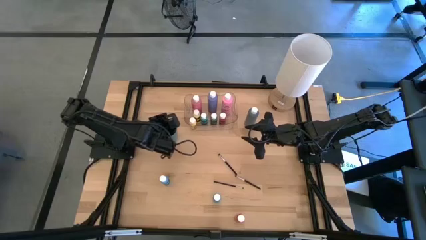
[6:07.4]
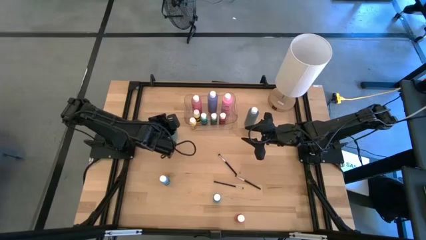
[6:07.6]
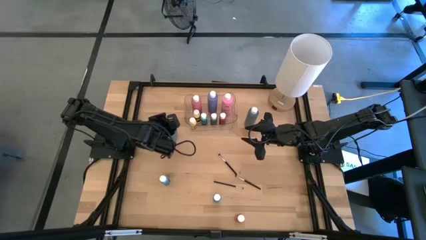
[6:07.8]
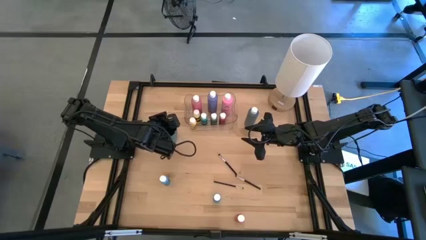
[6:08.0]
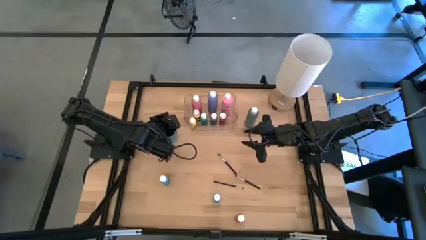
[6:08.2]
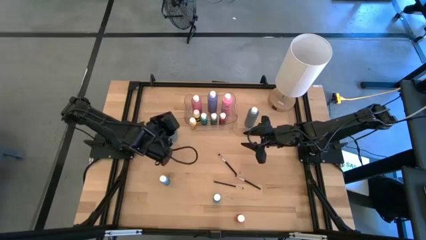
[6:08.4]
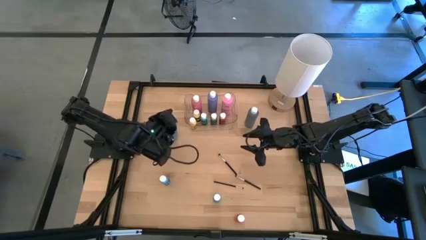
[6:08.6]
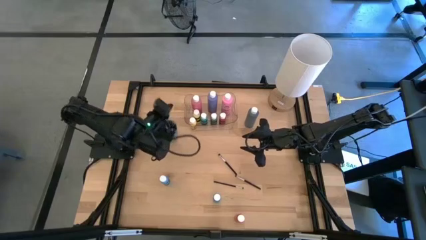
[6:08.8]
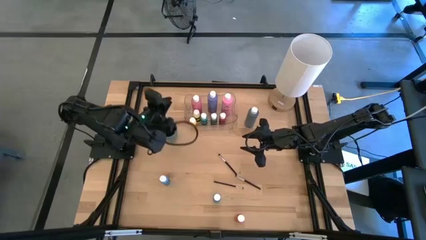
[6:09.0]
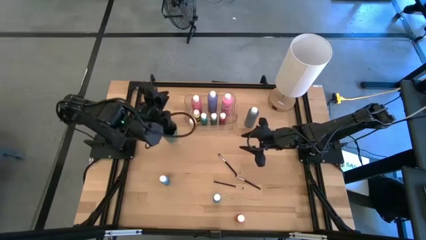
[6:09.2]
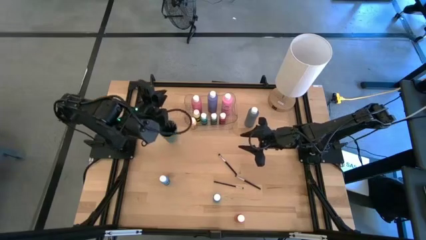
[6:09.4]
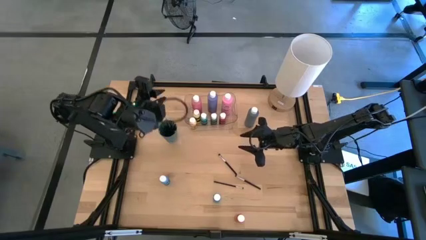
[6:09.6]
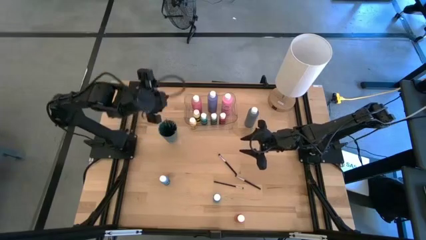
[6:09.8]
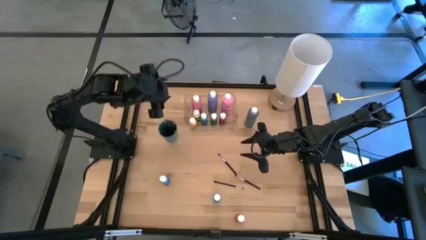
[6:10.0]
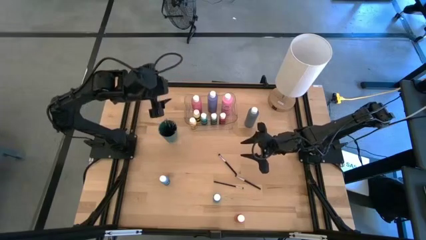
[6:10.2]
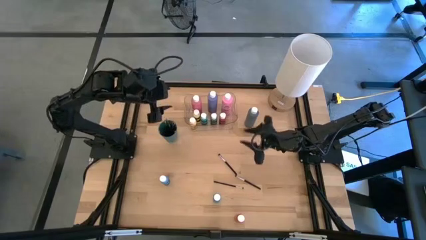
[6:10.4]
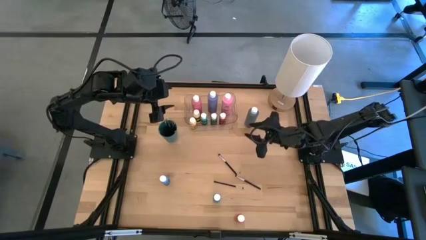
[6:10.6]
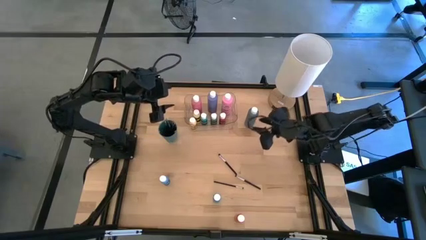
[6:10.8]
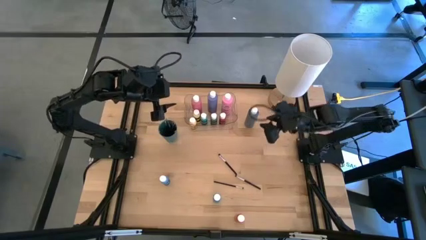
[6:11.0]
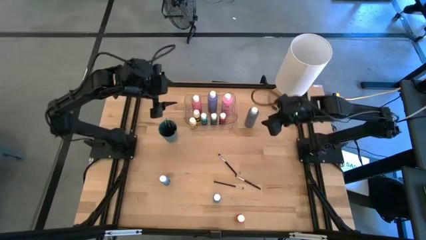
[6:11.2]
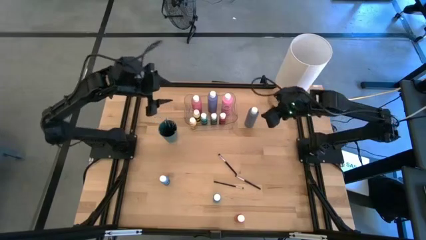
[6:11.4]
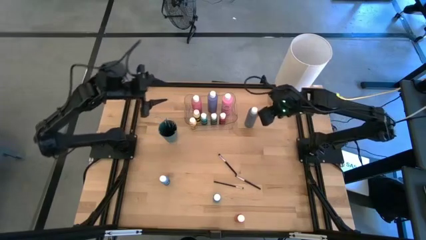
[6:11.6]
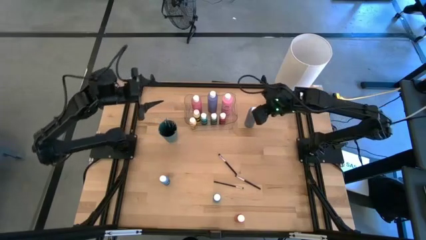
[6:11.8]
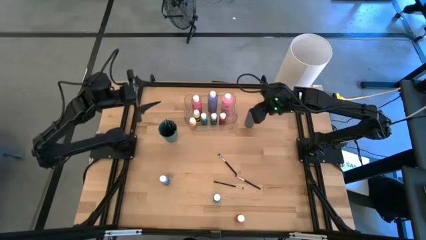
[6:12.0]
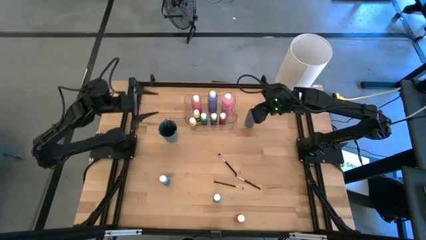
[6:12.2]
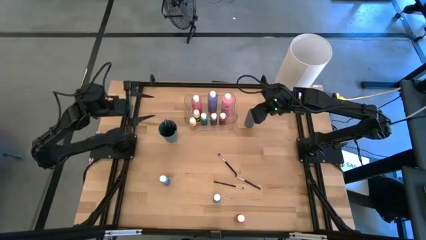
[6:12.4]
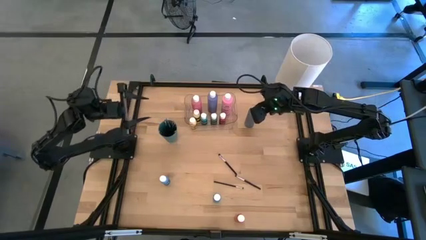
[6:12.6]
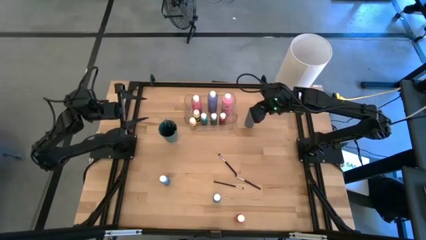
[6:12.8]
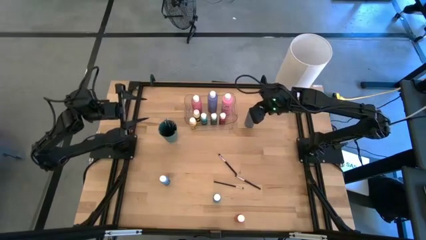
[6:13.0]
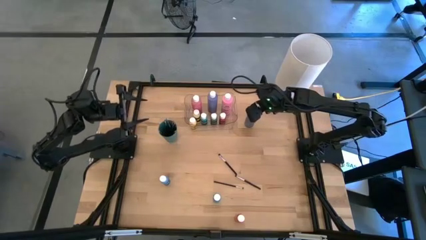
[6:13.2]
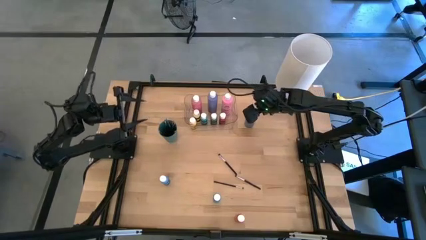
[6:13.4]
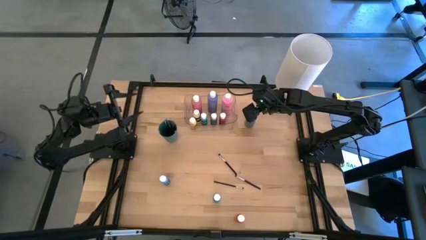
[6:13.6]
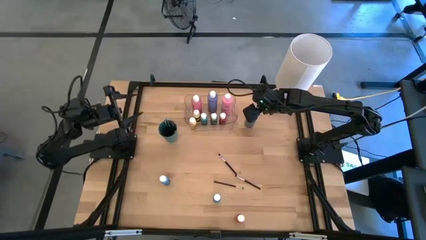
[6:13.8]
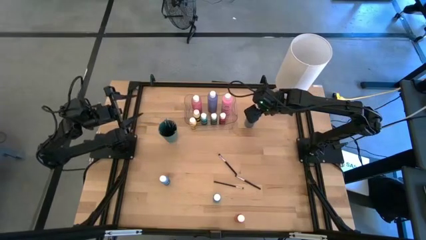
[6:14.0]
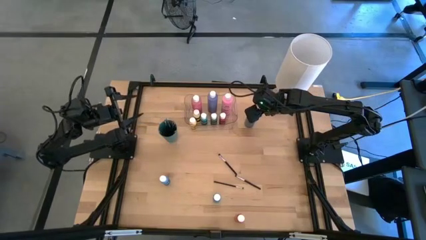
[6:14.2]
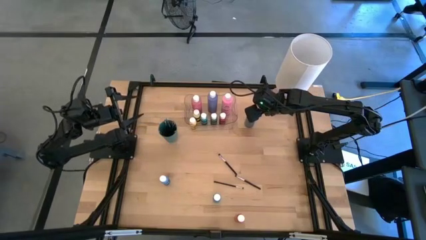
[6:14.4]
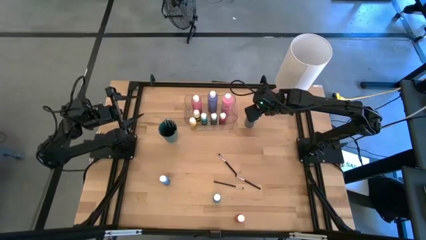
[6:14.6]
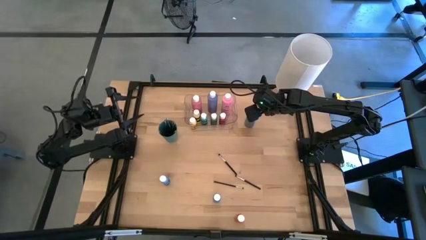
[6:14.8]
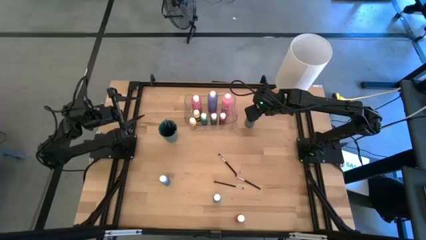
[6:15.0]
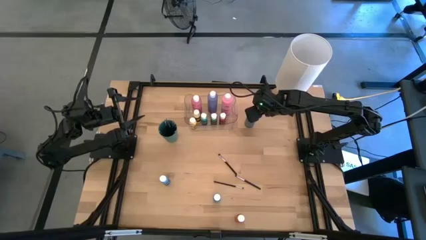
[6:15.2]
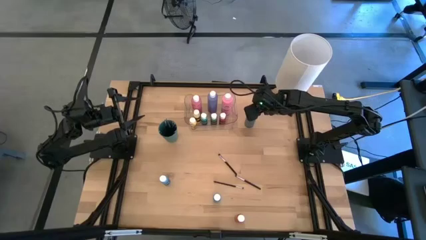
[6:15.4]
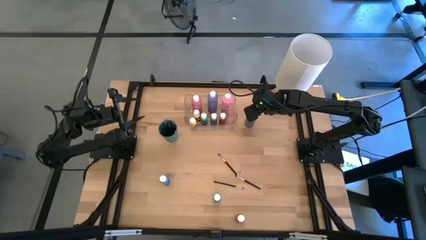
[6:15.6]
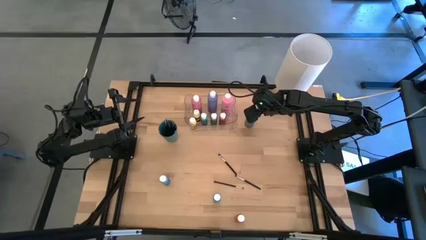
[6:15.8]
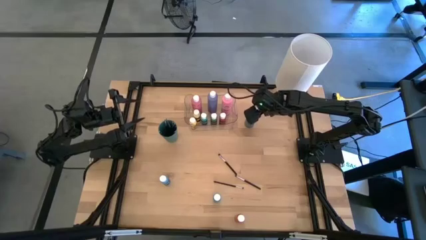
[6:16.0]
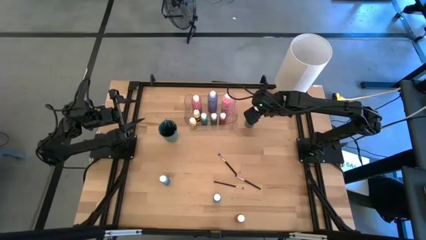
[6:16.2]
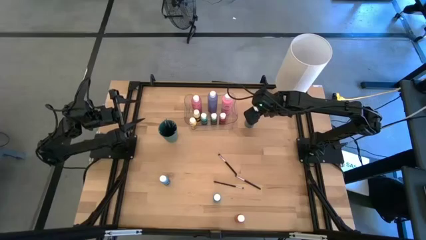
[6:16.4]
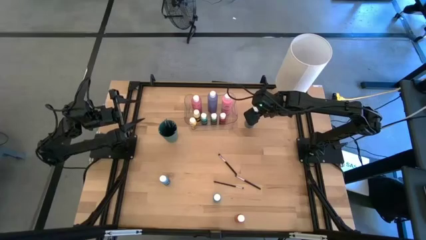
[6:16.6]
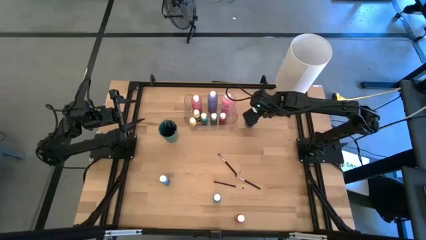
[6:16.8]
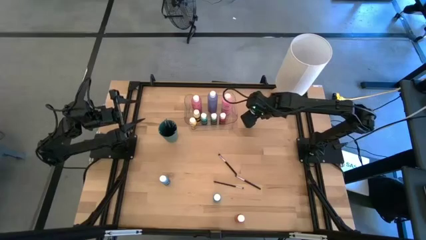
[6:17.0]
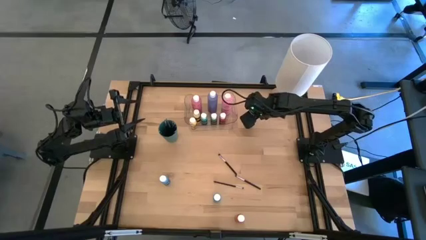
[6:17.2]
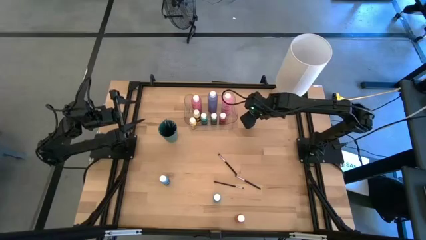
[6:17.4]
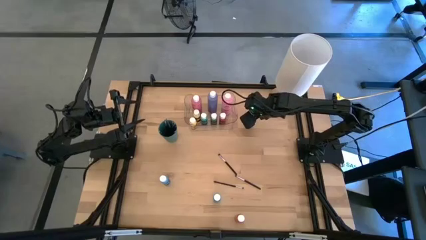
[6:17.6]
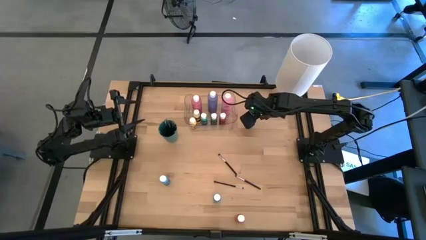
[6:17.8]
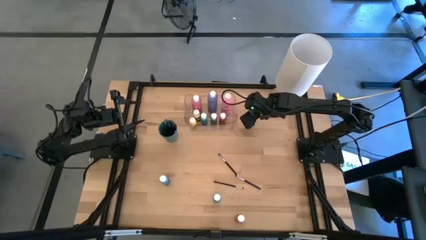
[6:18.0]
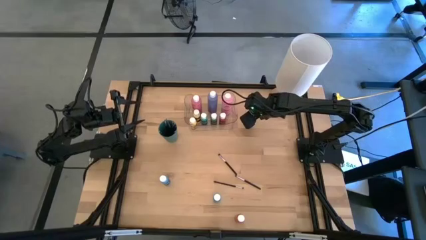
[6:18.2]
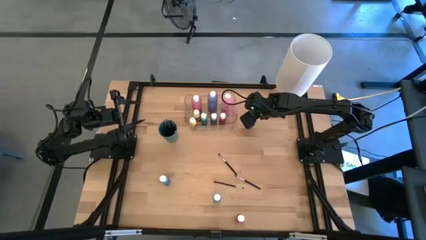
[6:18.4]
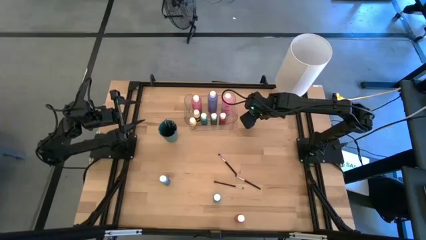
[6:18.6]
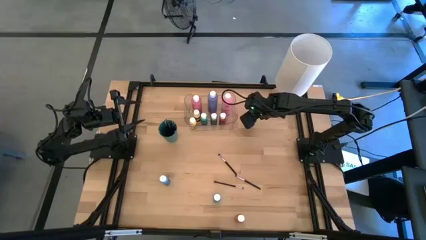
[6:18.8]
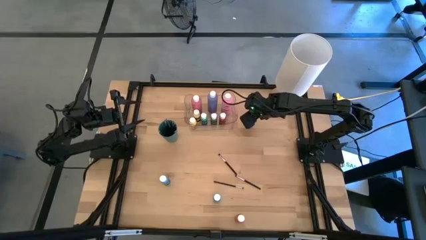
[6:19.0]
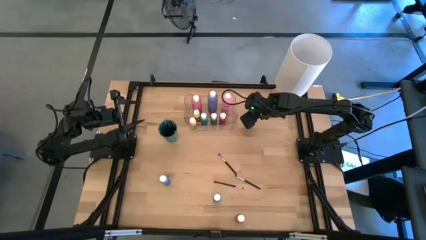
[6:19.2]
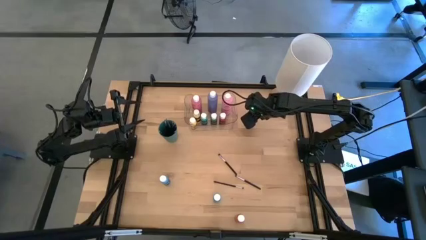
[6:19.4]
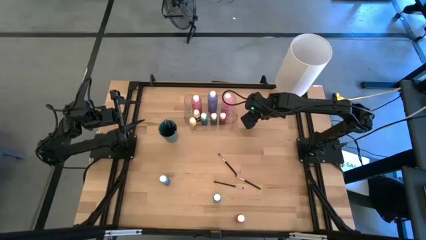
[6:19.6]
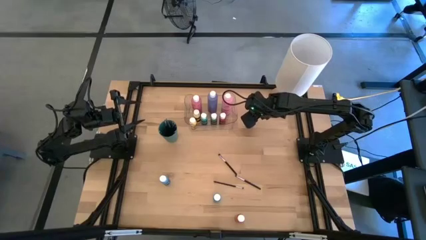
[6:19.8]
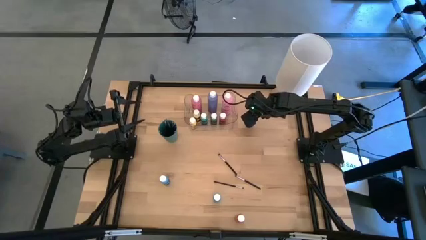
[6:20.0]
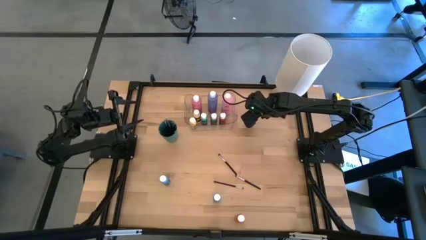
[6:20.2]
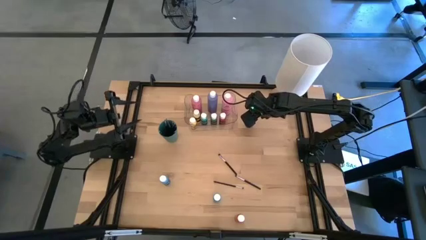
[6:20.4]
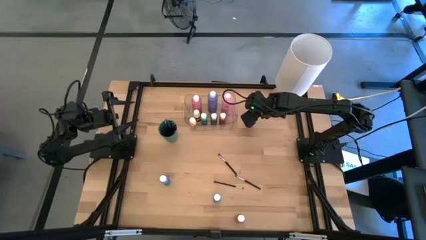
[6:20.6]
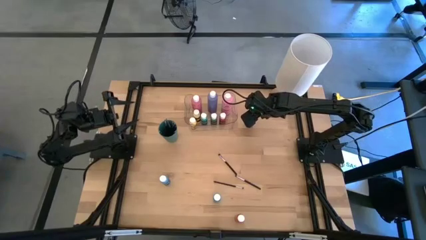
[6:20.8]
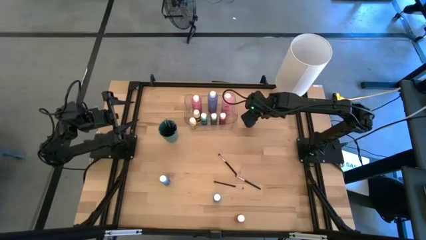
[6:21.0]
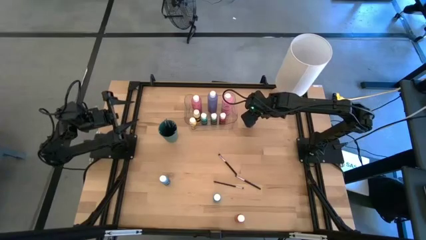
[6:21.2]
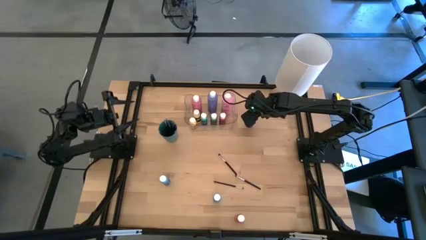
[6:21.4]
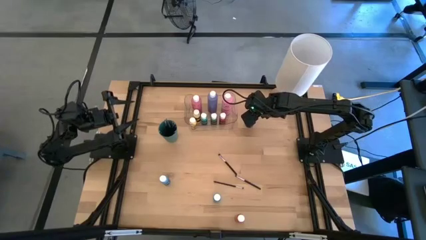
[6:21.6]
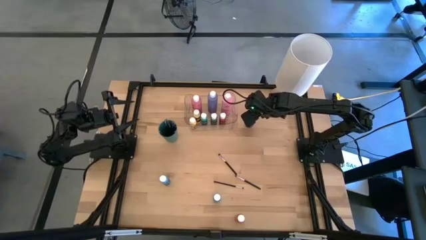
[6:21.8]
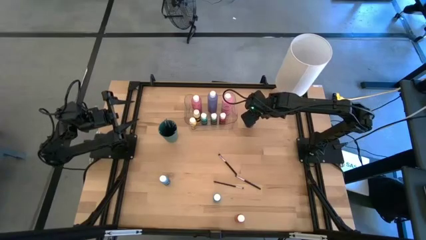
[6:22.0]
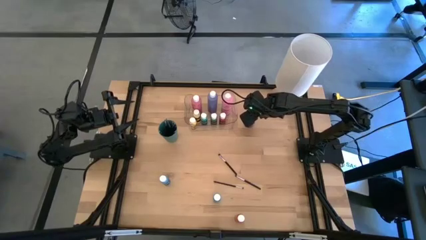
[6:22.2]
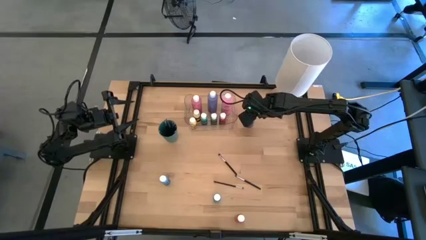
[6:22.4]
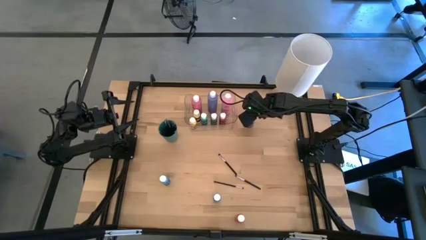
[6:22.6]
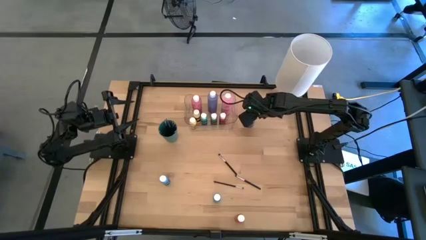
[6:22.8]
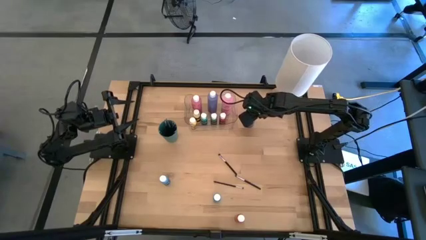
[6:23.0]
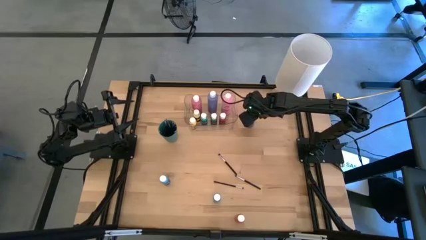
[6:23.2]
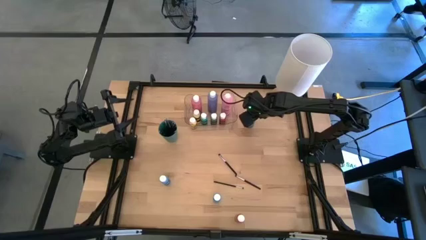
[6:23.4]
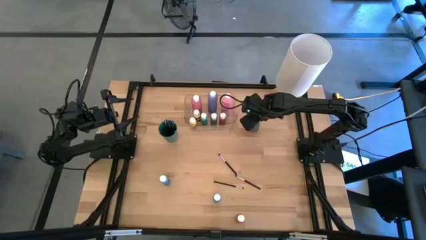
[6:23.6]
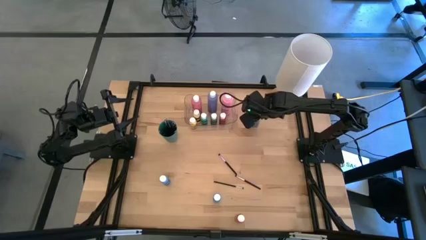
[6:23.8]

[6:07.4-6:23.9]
Task: Pick & Place Paint Supplies
Put the gray paint bottle into the transparent bin

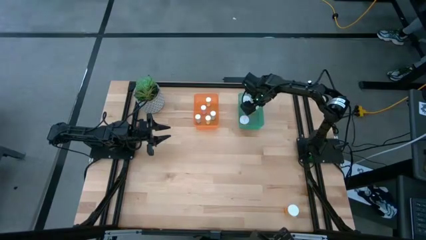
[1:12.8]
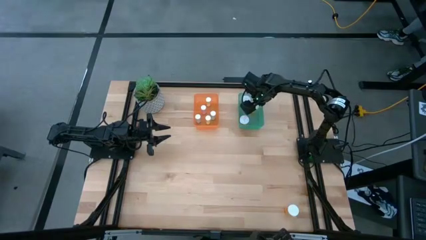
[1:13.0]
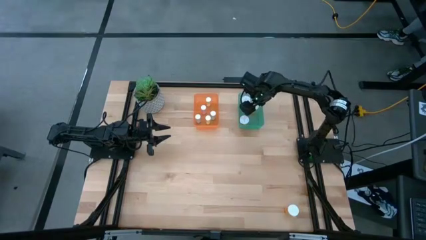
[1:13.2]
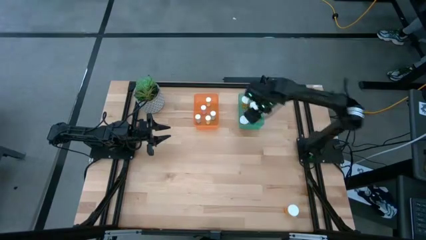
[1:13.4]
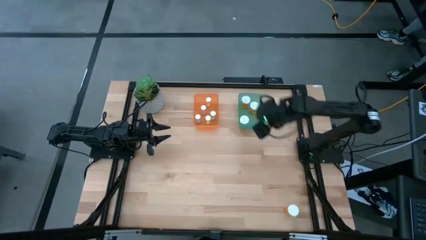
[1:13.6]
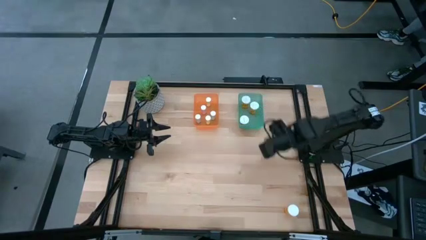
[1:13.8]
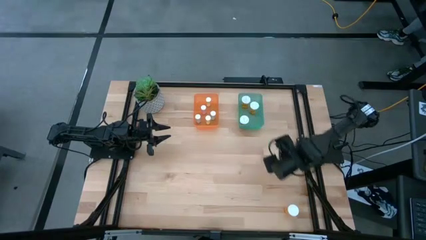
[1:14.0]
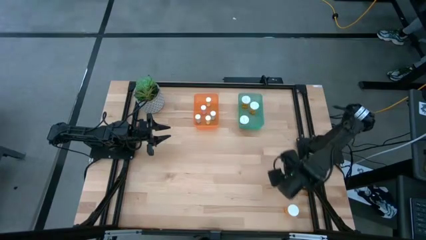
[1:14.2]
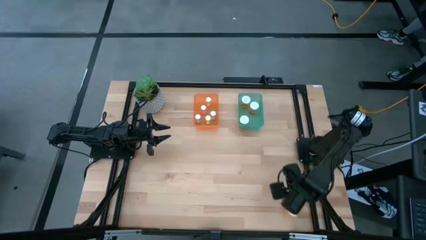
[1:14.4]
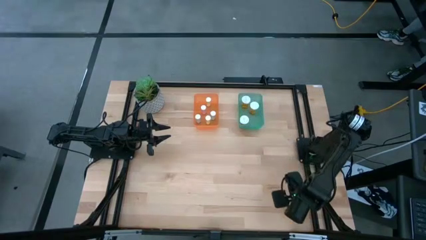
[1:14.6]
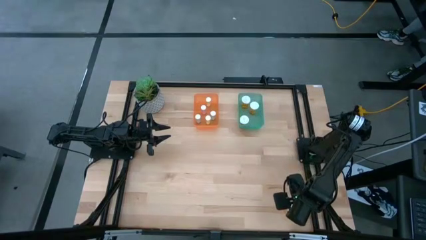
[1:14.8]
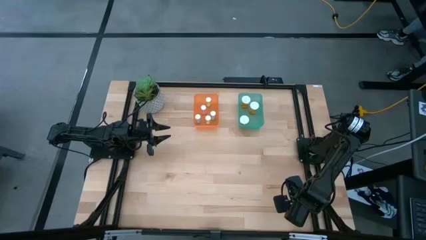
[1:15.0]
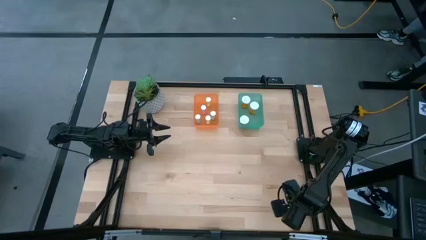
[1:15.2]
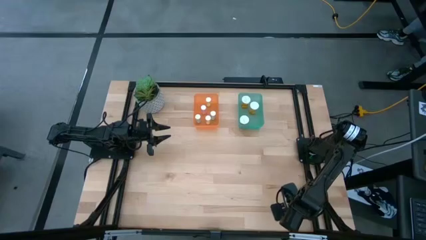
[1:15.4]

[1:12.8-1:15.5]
Task: Pick and place medicine bottles into bin by pill shape (circle, oval)
Put the large orange pill bottle into the blue bin
